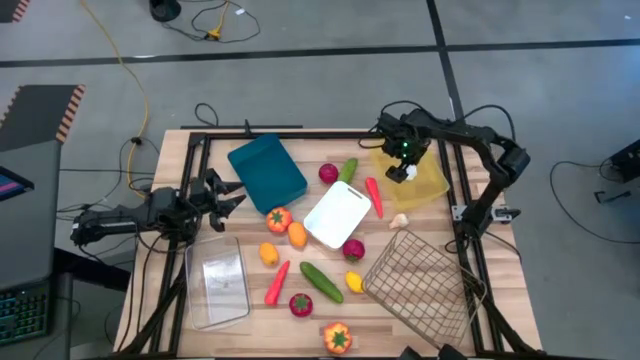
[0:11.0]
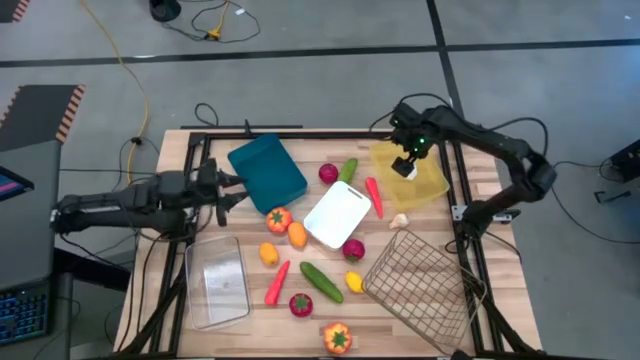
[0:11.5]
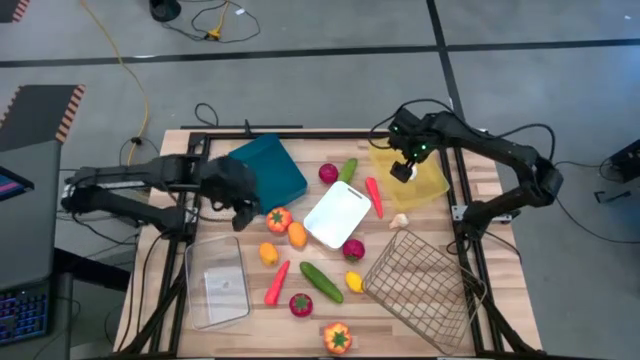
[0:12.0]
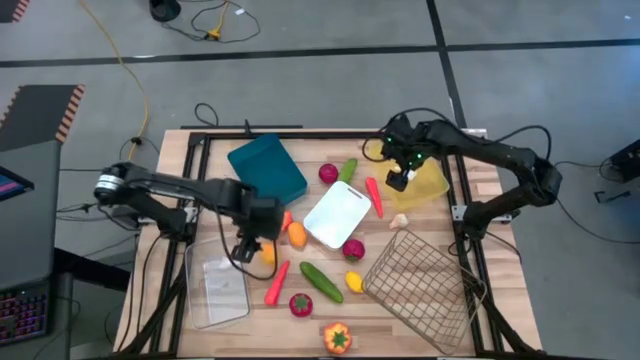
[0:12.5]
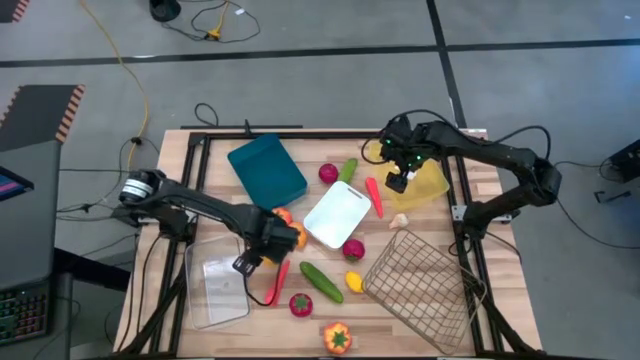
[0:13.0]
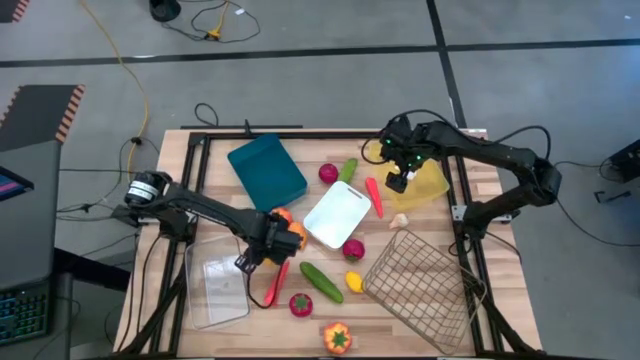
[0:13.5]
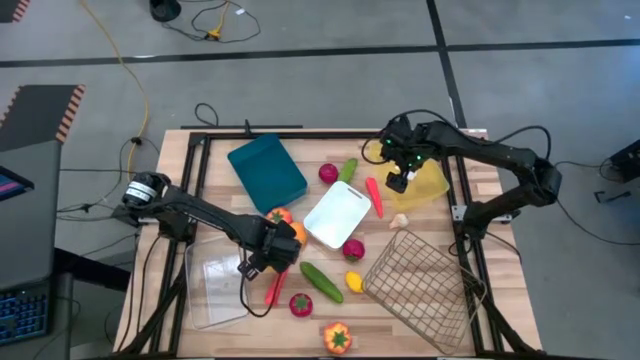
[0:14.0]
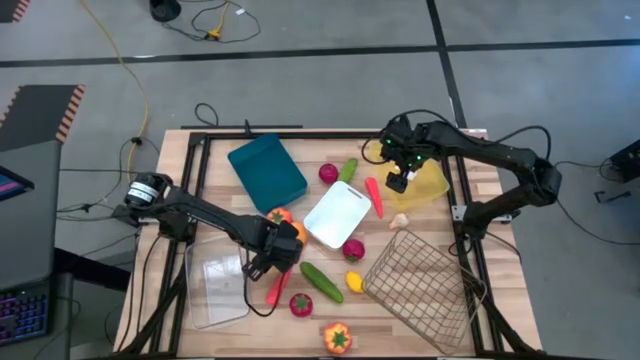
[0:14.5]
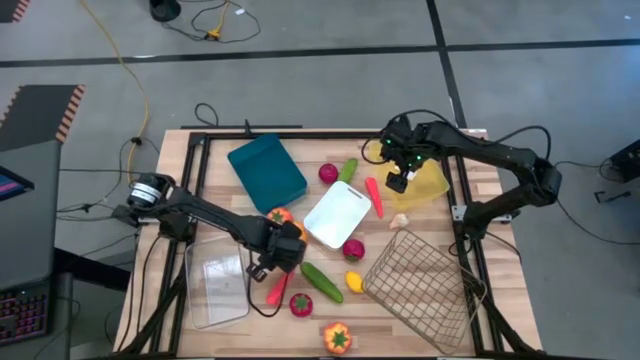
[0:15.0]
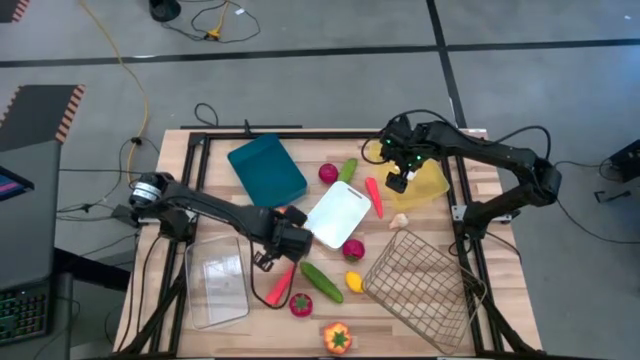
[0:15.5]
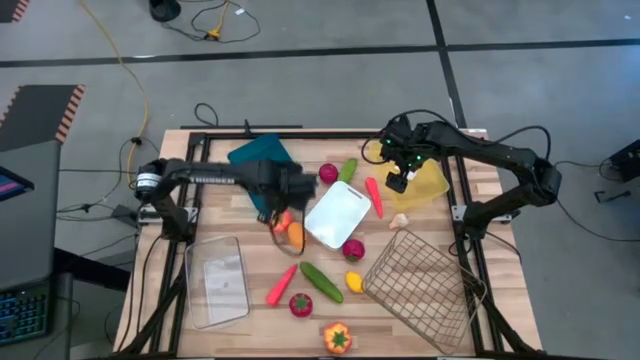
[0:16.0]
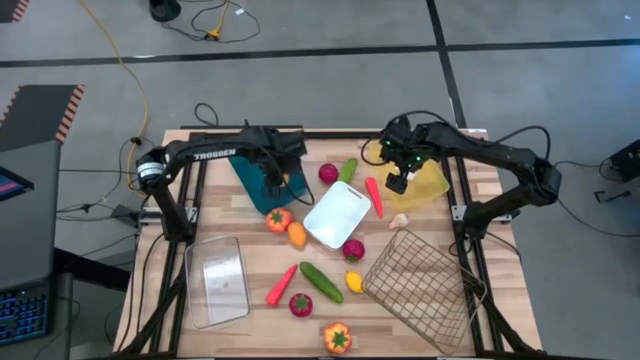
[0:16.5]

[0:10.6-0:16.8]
Task: Sort produce into baskets
Put the top left yellow lemon into the blue bin

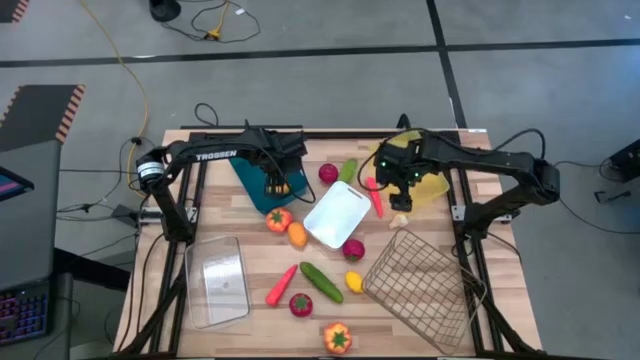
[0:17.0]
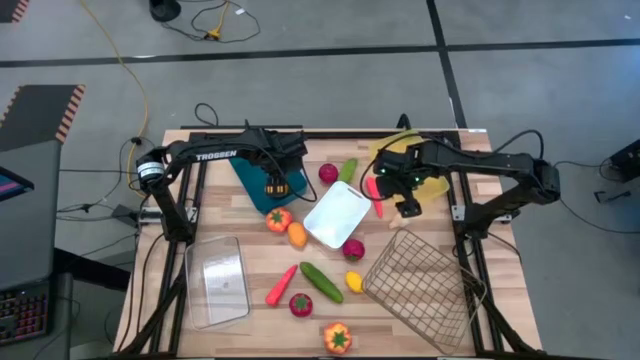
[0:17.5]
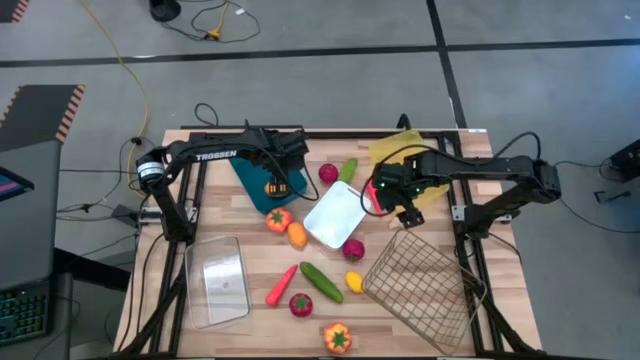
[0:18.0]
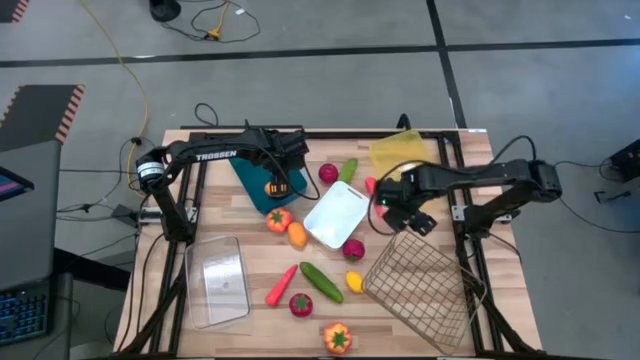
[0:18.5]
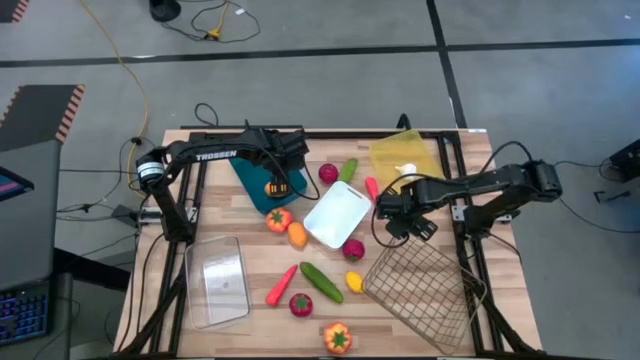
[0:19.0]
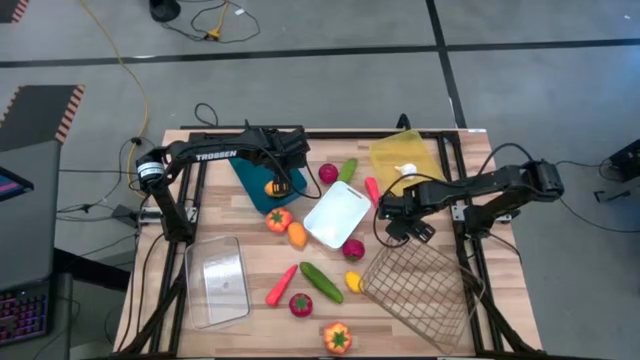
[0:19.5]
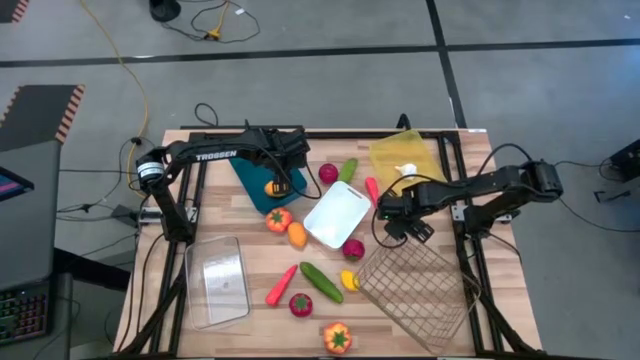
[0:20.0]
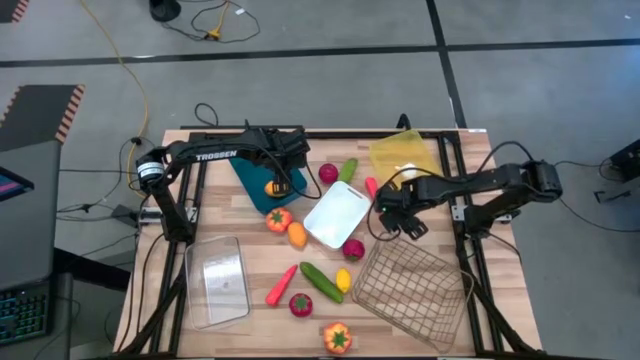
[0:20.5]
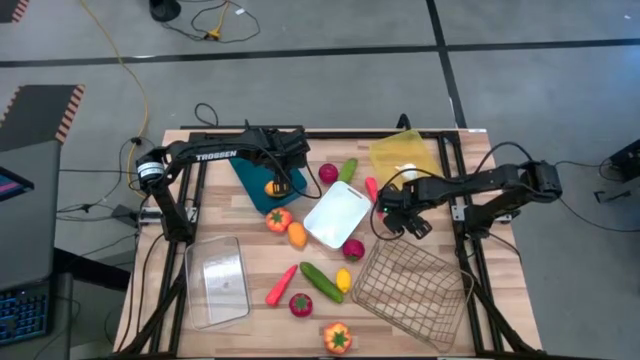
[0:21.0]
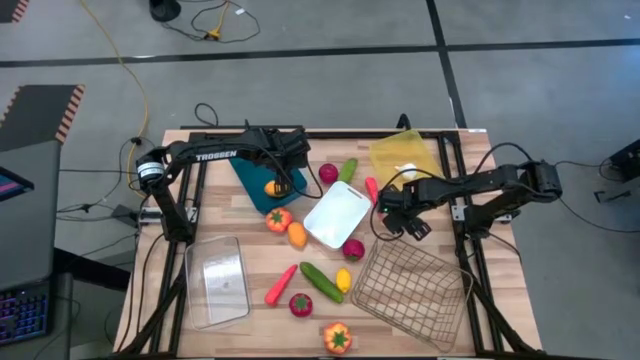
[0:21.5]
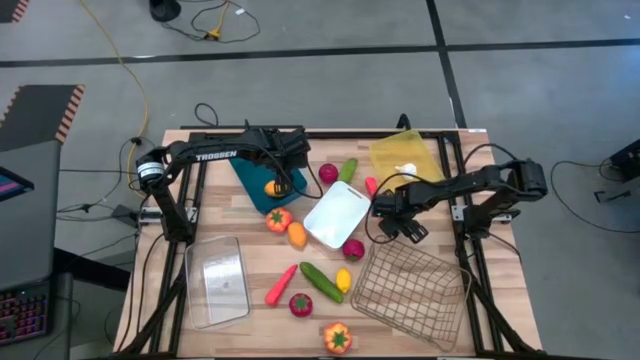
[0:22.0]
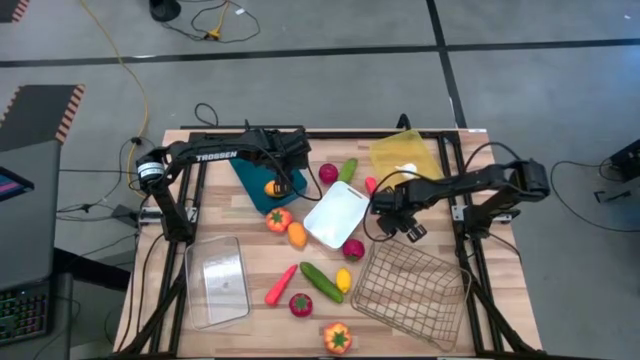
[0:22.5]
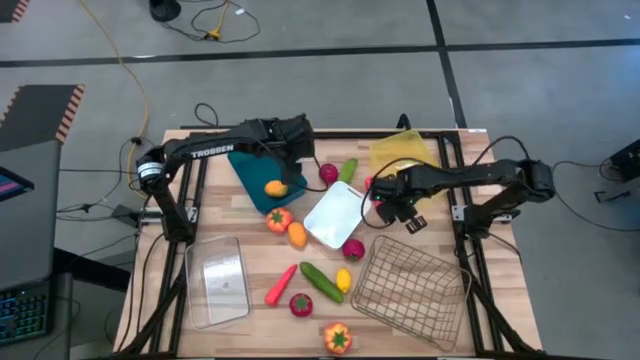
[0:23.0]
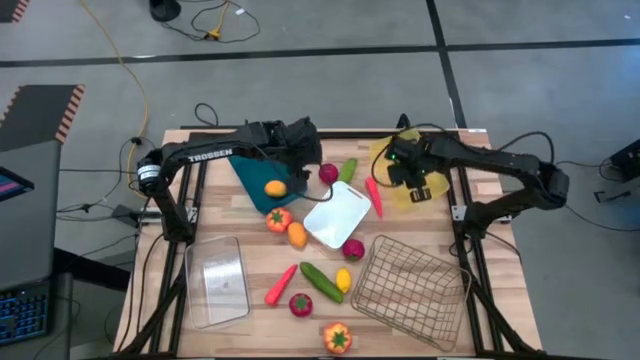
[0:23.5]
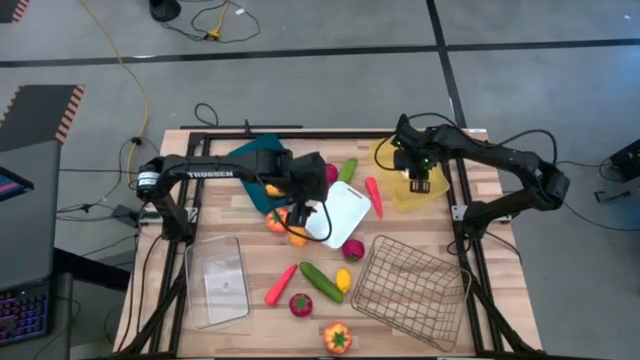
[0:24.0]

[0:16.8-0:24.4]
Put the white garlic into the yellow bin

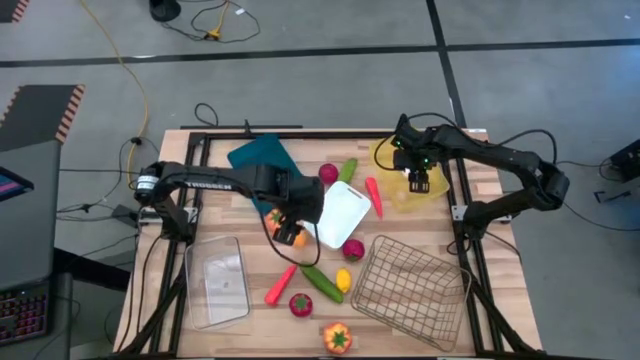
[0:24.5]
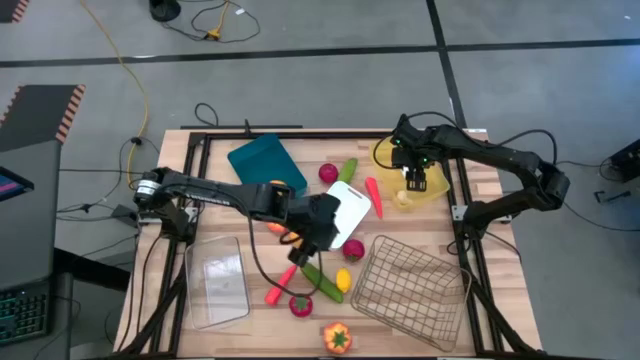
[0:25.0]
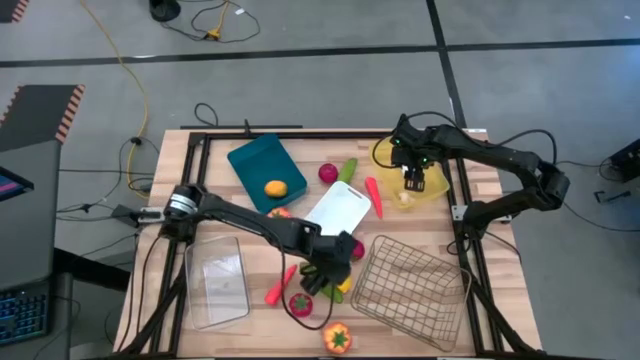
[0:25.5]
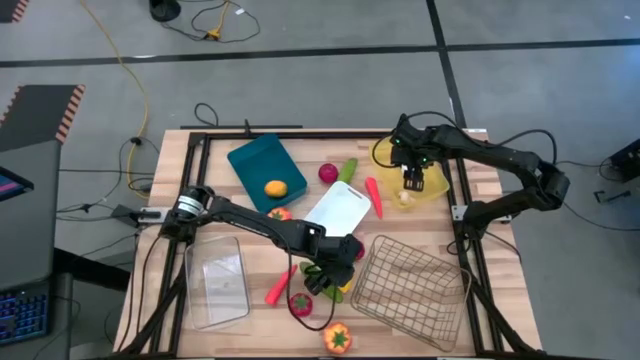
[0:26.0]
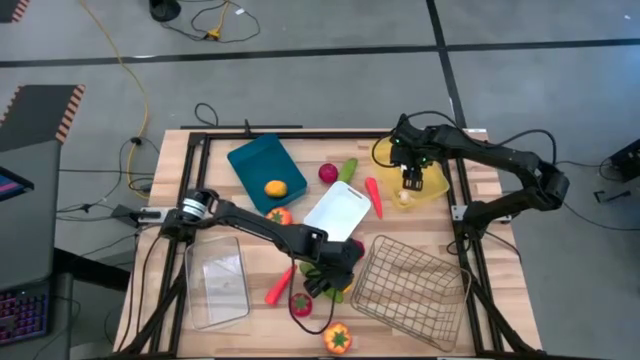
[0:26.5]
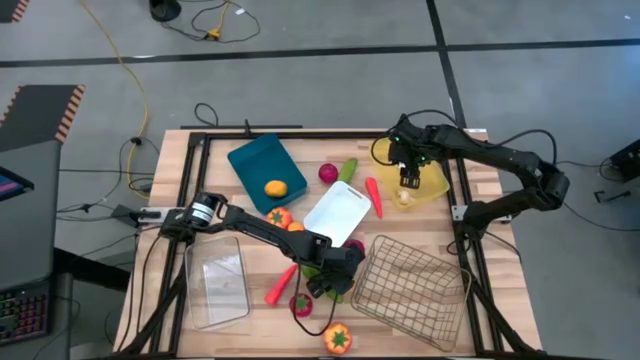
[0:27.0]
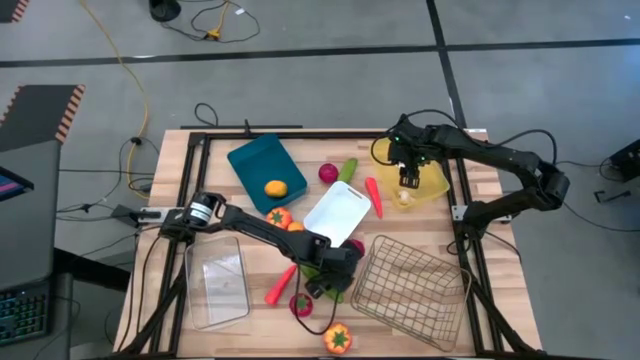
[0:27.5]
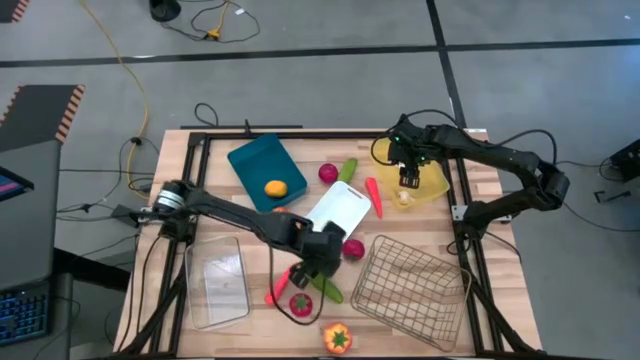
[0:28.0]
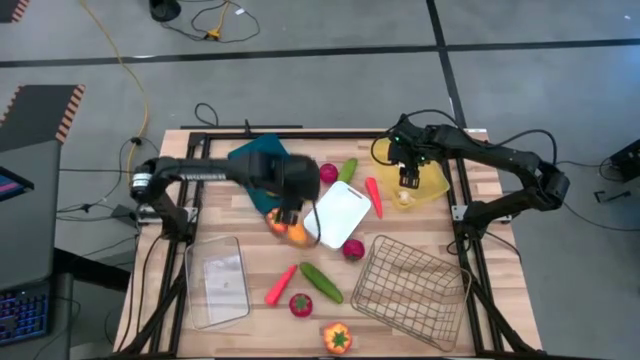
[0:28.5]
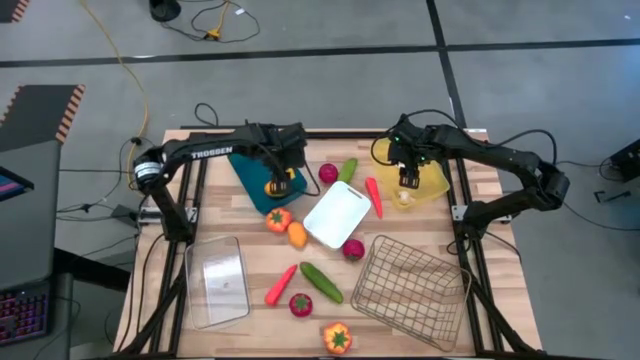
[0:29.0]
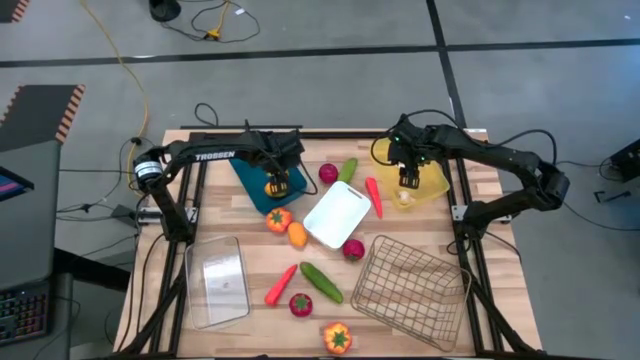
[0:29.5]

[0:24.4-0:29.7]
Put the bottom yellow lemon into the blue bin

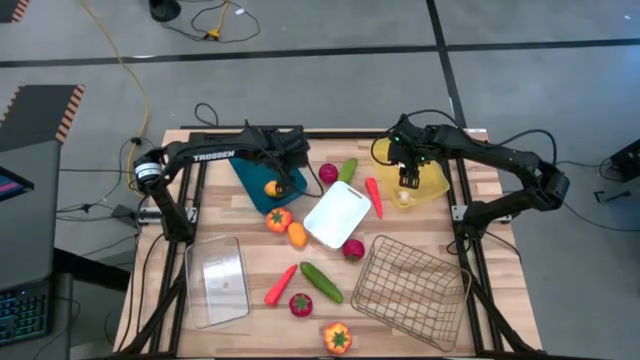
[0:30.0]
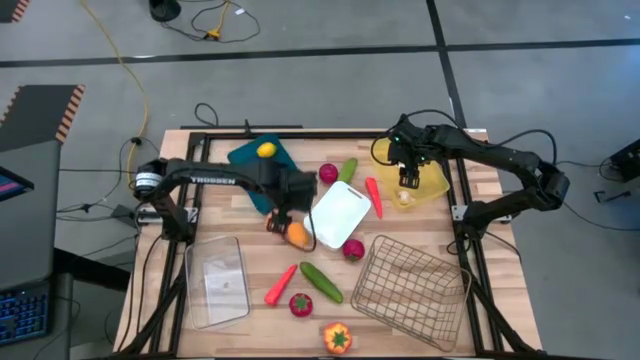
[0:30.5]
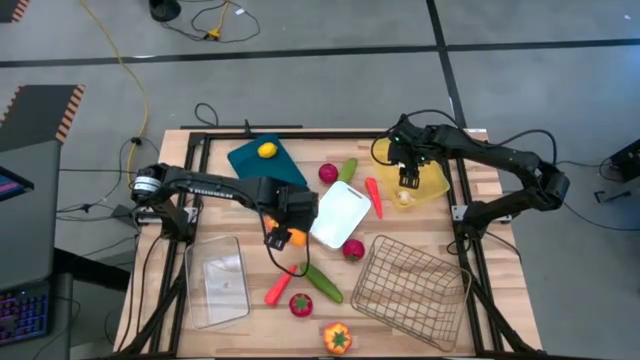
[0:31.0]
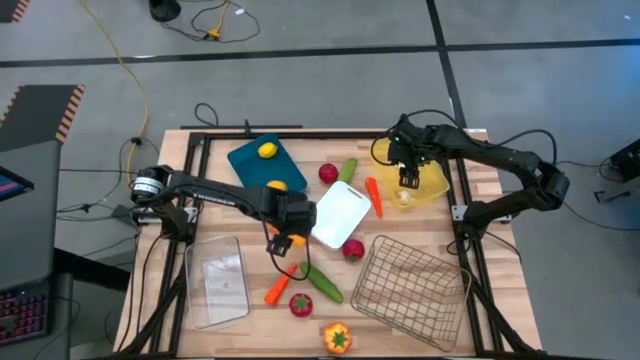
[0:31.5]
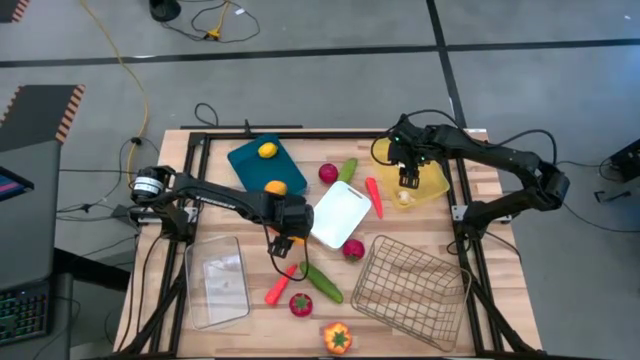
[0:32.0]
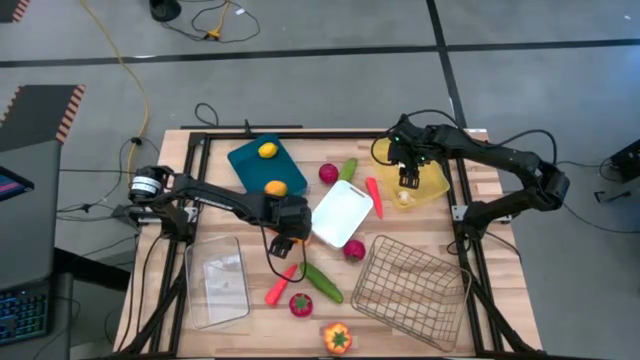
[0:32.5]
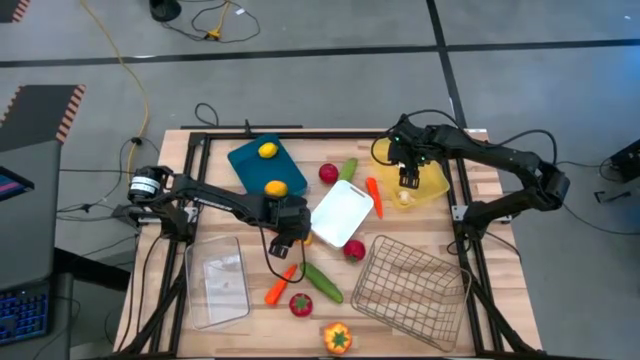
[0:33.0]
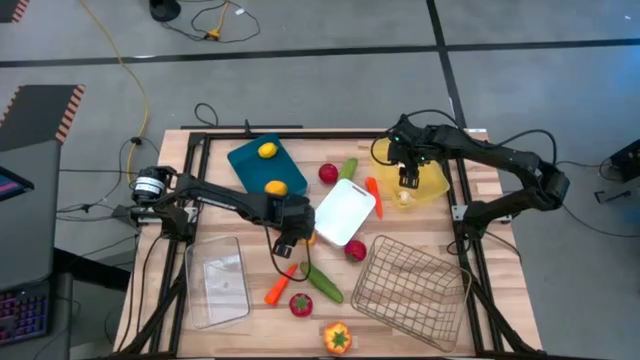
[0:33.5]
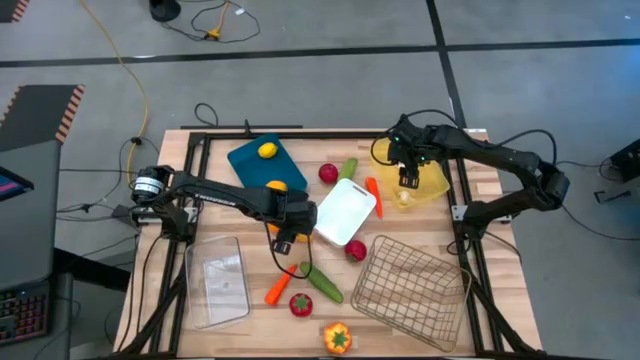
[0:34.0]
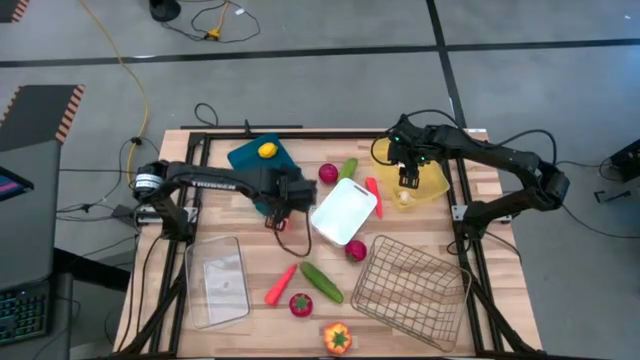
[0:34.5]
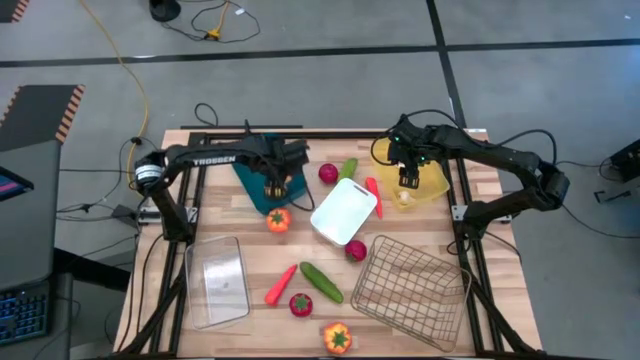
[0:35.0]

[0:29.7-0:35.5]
Put the yellow lemon into the blue bin
